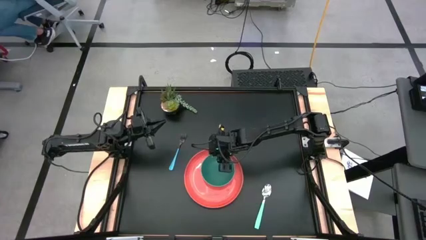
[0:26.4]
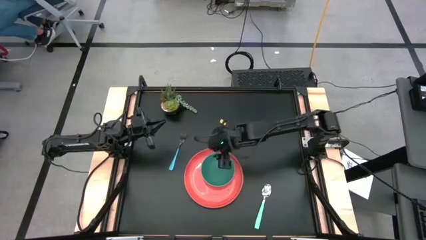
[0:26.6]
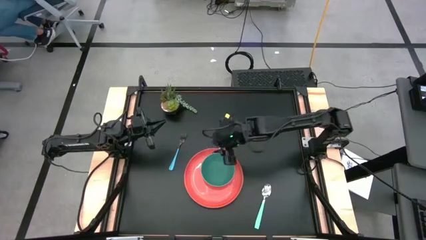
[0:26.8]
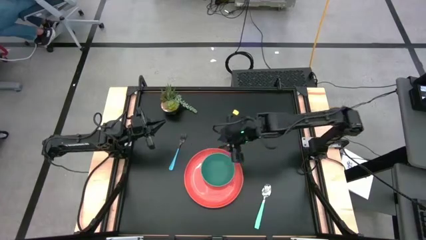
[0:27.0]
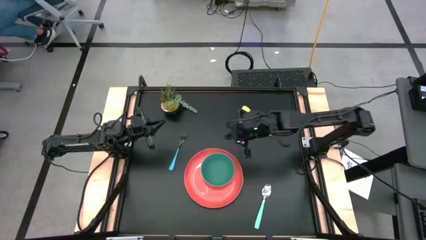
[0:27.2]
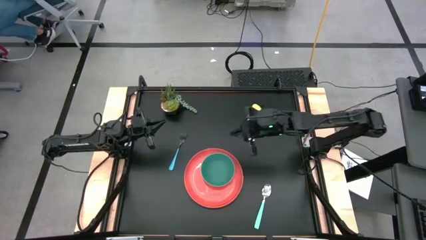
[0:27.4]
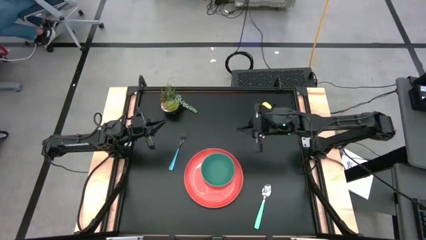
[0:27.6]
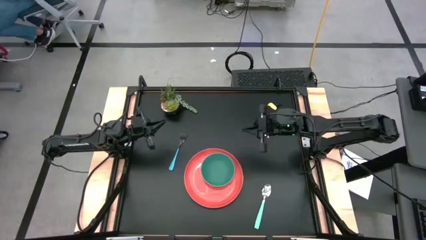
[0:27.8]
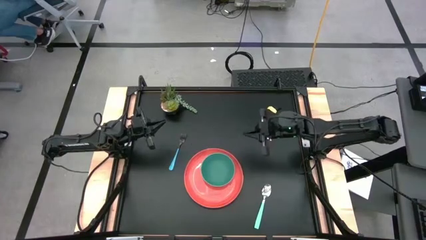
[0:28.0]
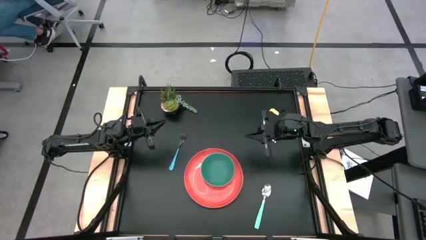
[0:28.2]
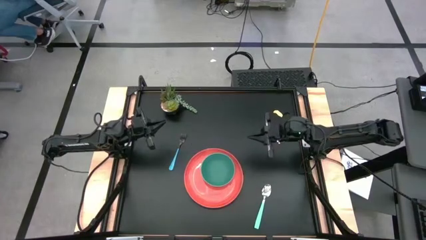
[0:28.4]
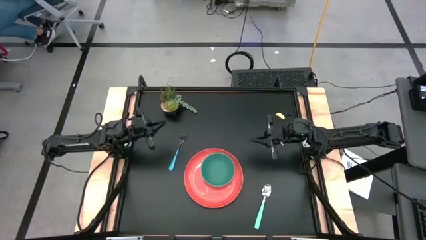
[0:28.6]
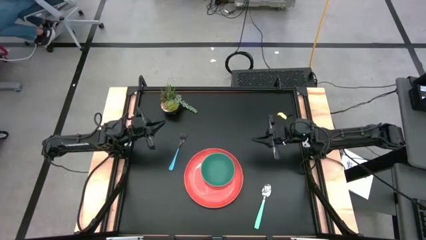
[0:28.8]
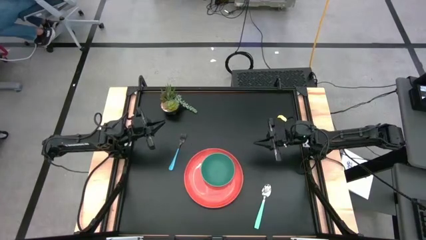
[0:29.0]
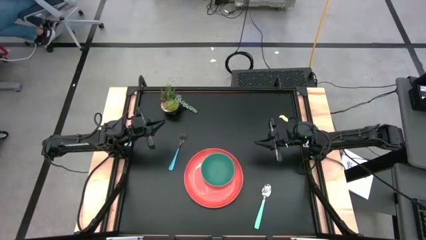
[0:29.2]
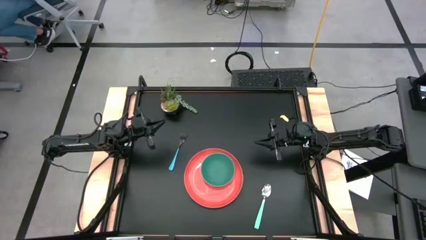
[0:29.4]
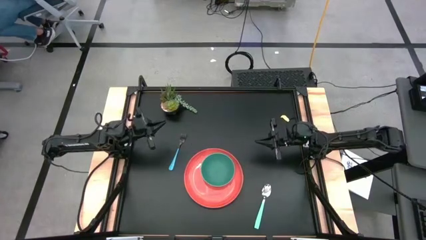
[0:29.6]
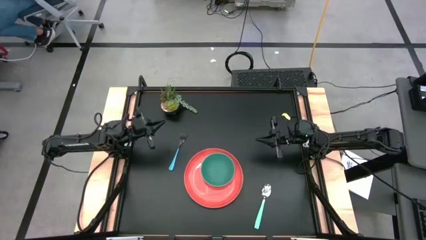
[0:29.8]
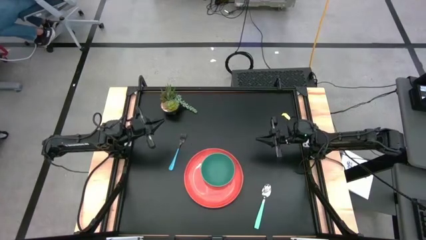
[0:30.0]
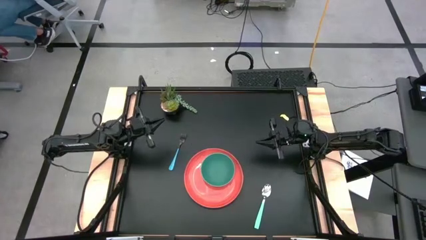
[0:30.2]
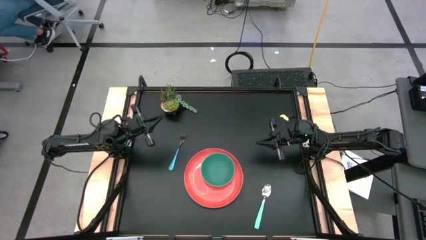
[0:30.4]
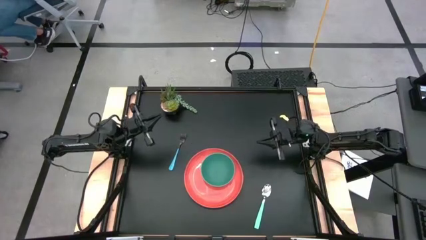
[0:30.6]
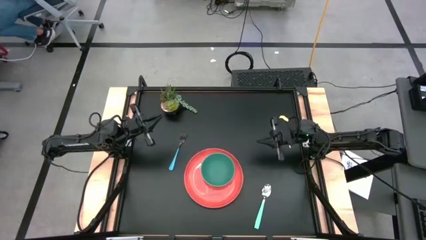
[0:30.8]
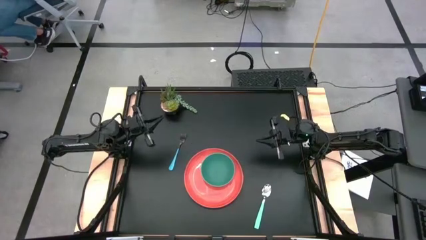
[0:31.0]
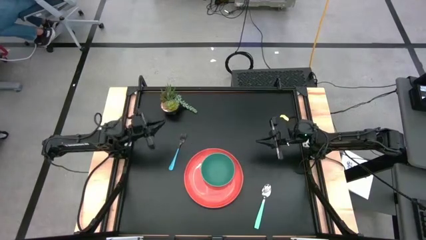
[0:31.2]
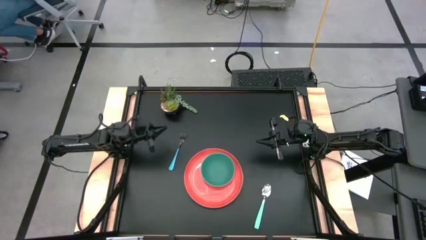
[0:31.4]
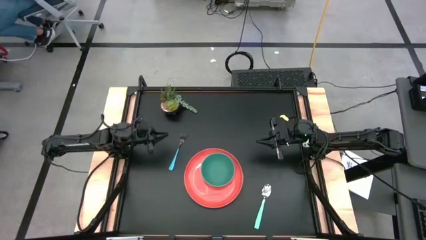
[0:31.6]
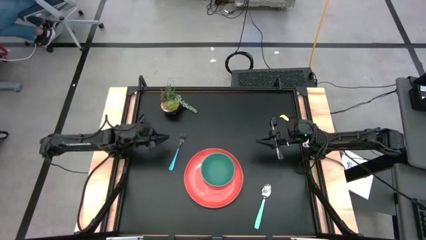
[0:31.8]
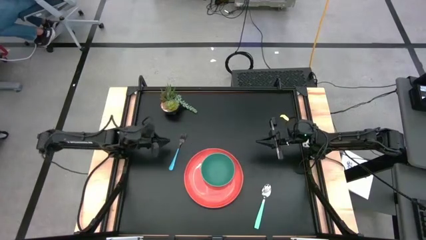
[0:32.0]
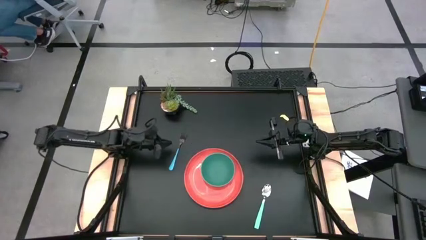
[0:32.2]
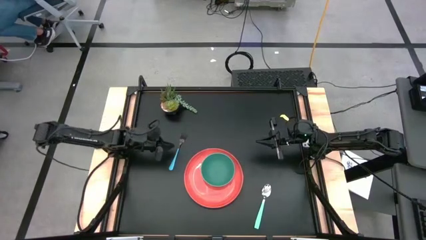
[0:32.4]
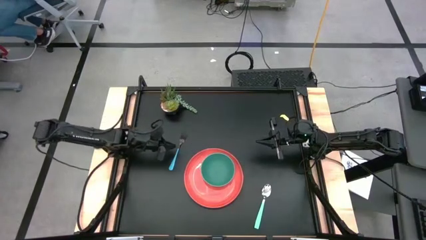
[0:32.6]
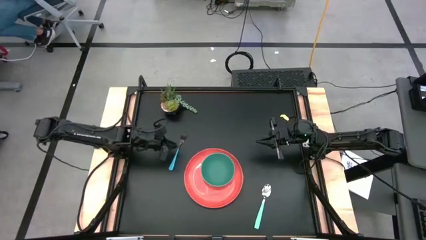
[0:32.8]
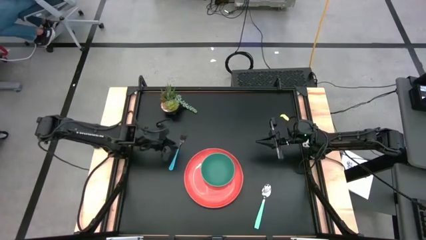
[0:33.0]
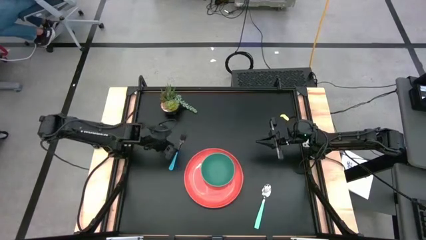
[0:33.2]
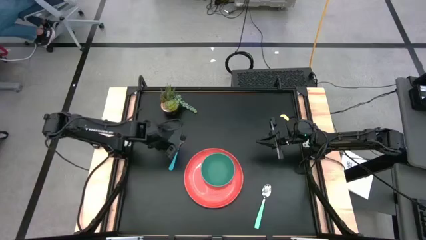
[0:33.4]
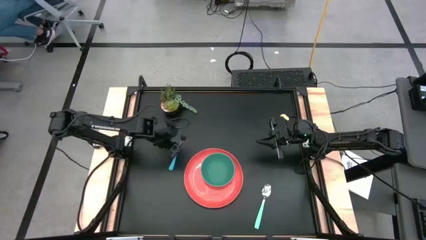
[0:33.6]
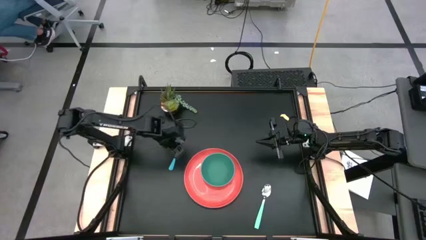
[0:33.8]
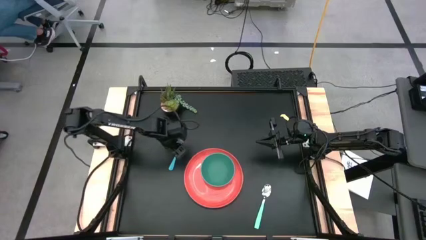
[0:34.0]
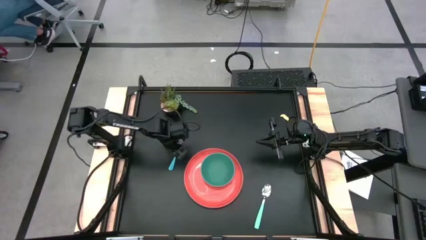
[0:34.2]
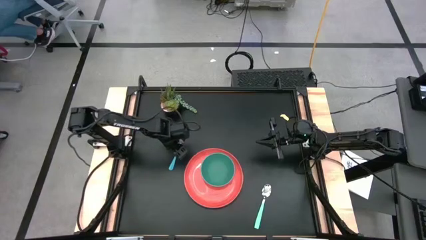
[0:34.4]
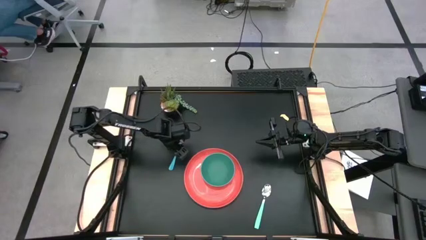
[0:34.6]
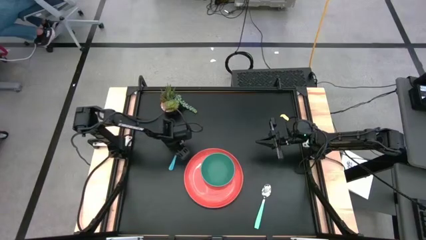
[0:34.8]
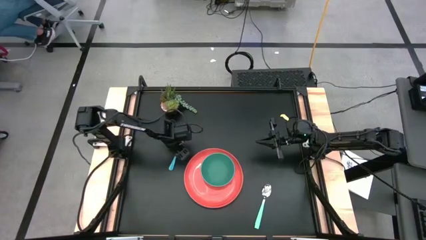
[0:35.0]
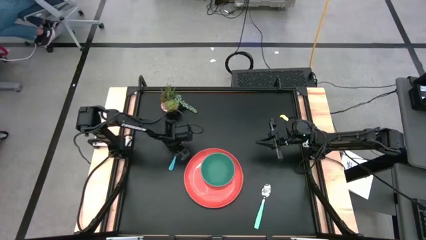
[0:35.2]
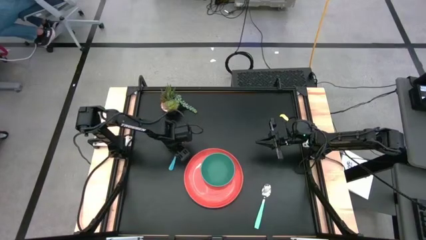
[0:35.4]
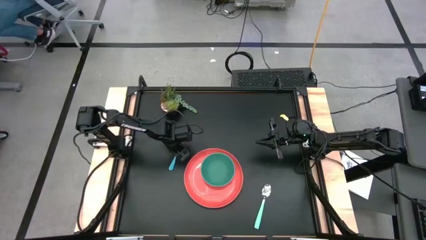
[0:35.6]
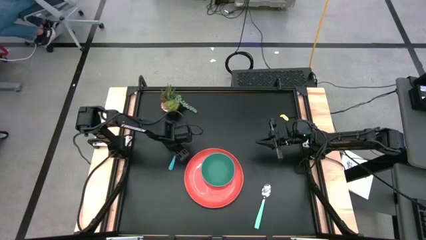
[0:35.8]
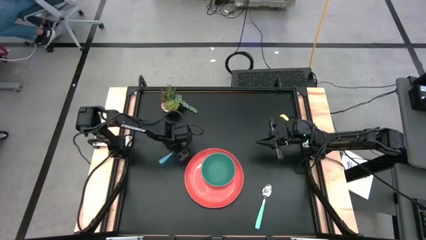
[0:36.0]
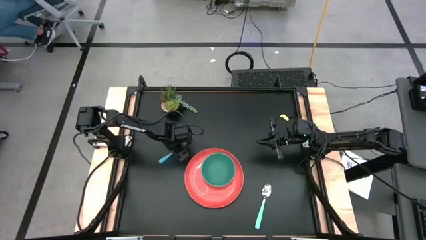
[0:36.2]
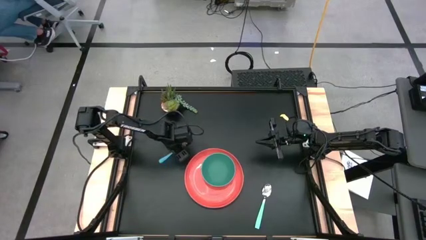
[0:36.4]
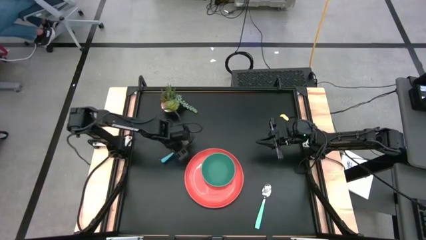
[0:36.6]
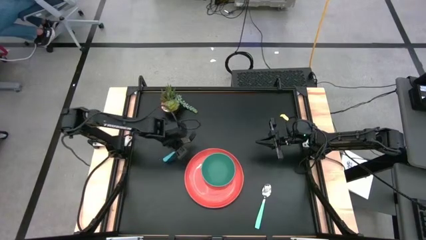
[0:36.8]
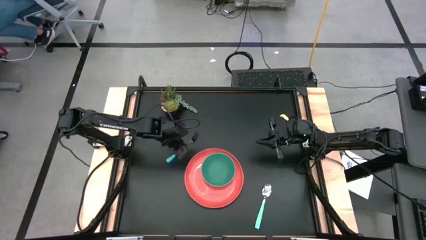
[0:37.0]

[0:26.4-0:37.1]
Task: Set table place
Put the blue fork to the left of the bowl green bowl on the orange plate
